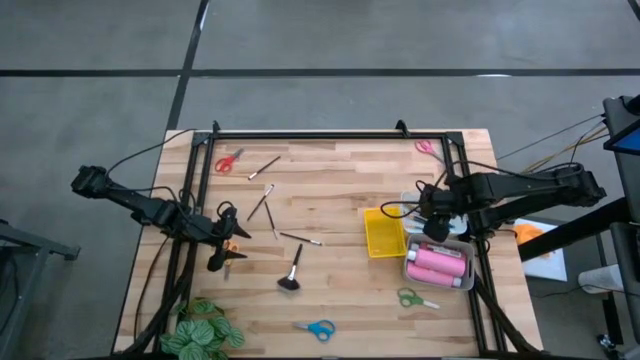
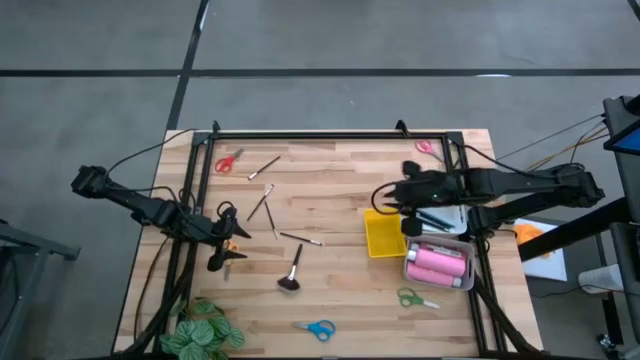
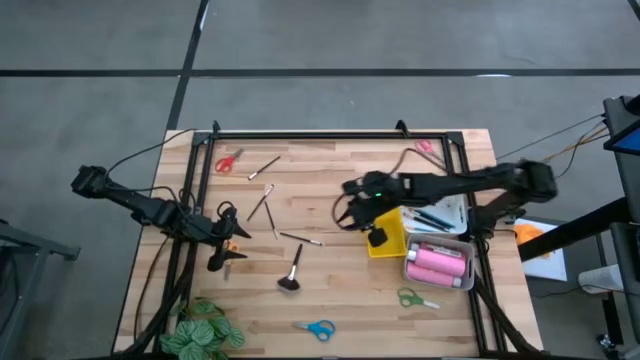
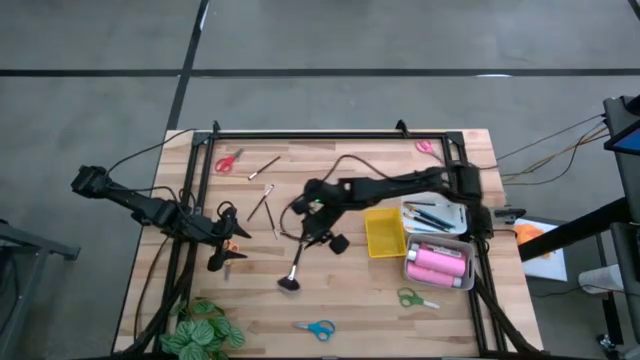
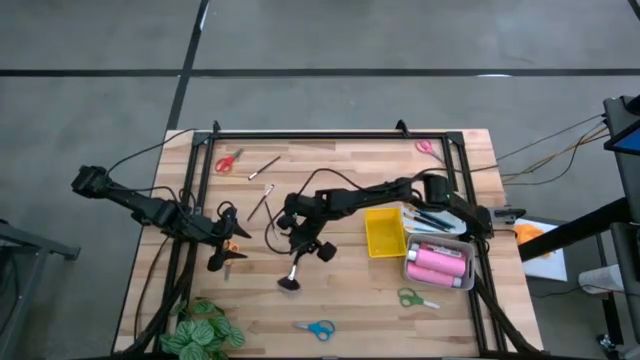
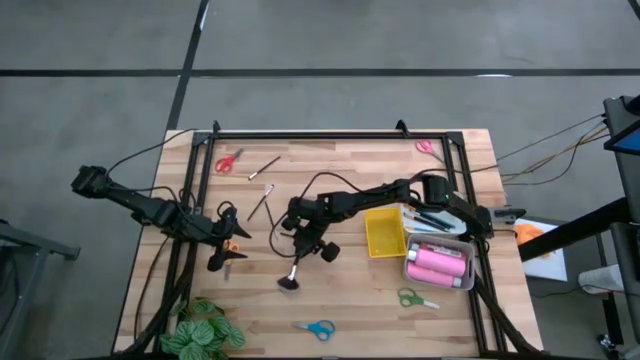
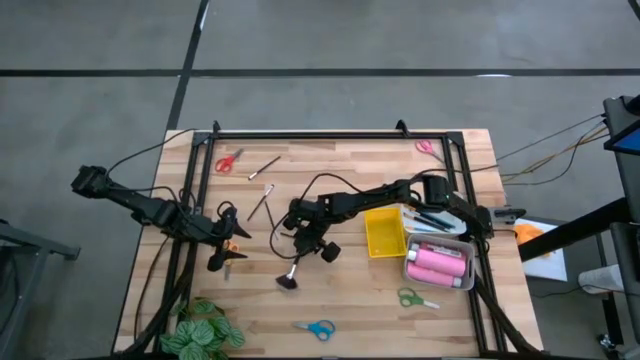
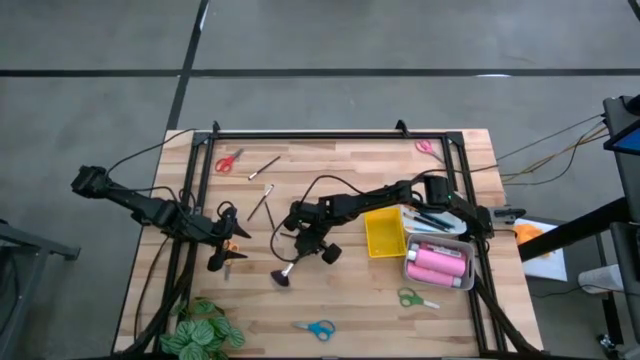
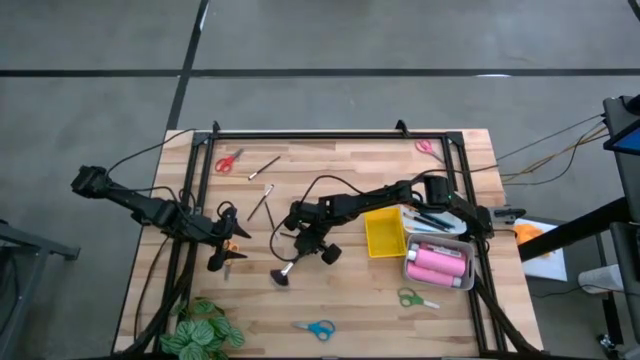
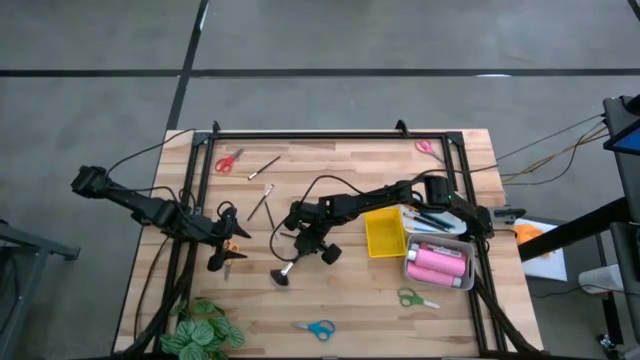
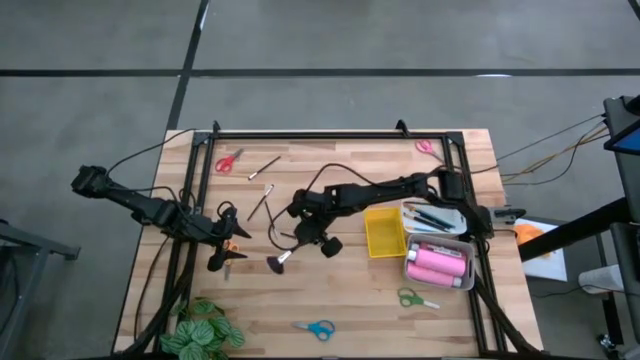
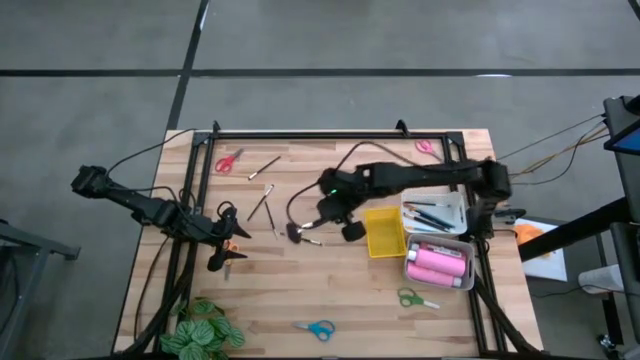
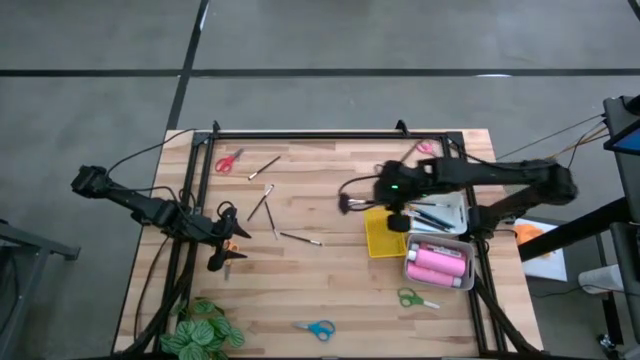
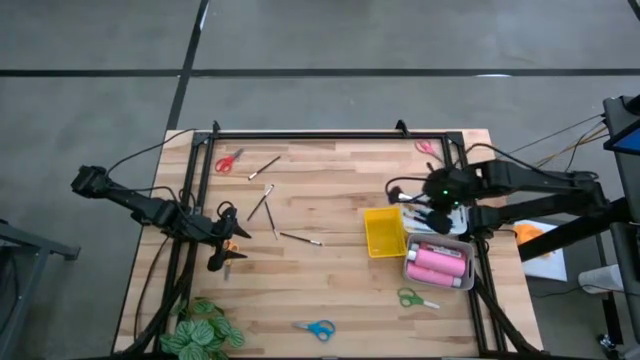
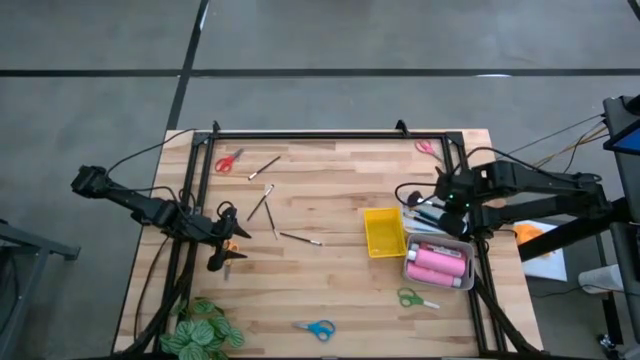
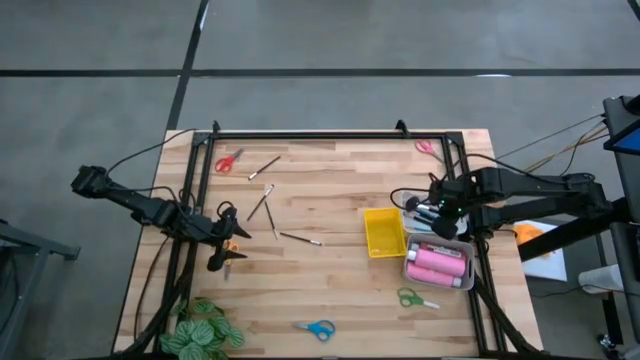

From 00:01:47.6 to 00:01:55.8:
Task: Pick & Place Paint Supplies
Put the black paint brush into the white bin

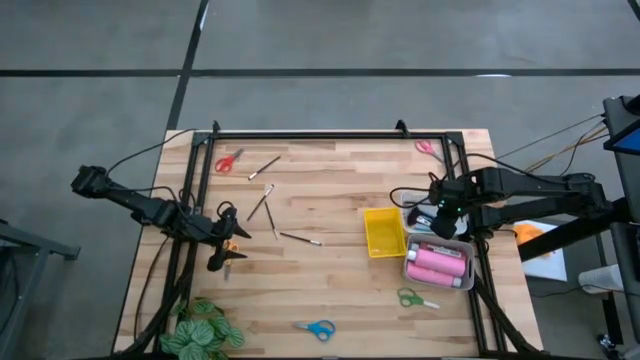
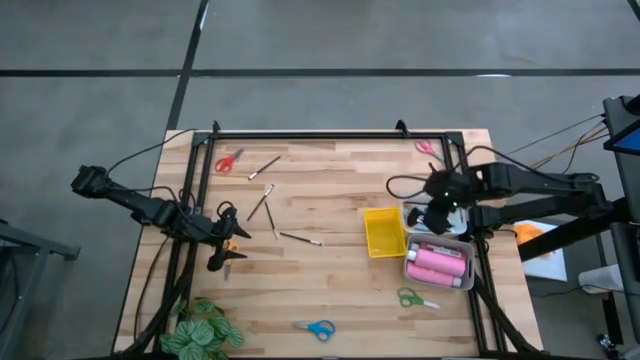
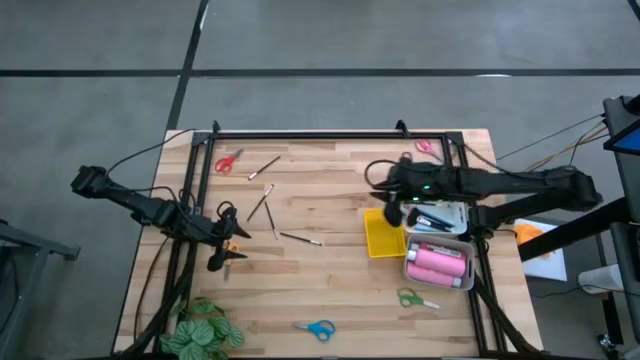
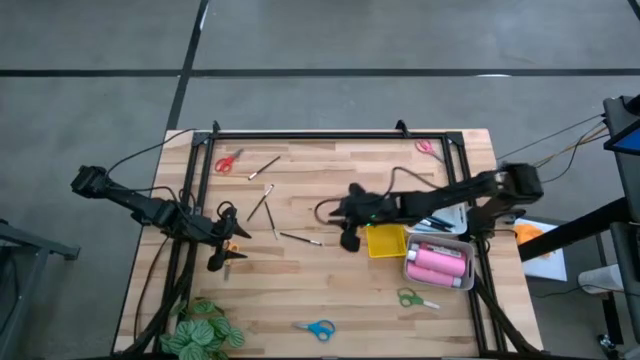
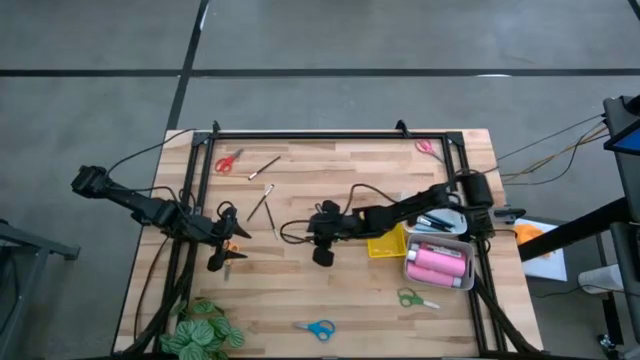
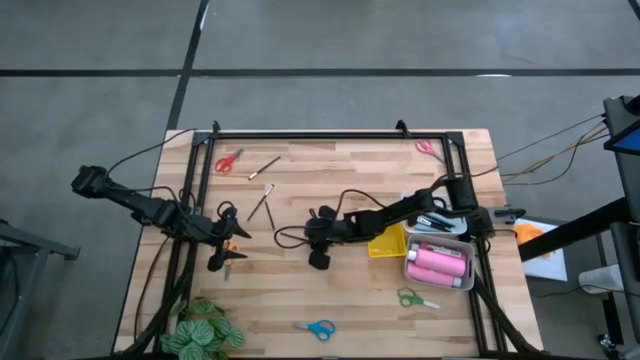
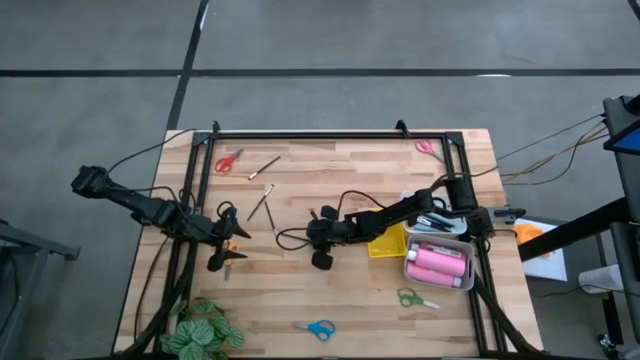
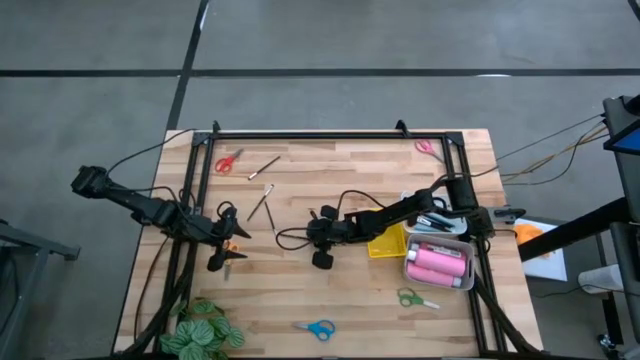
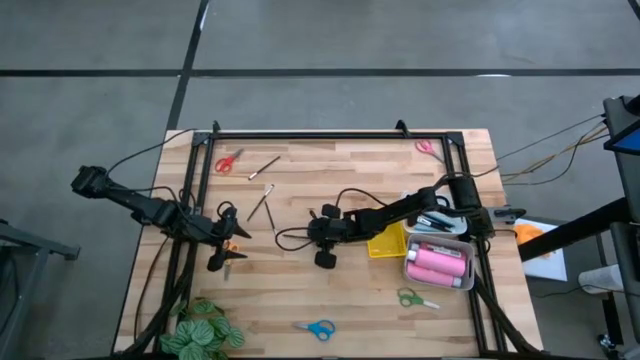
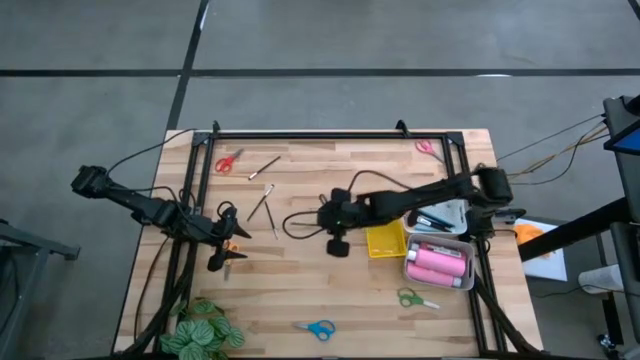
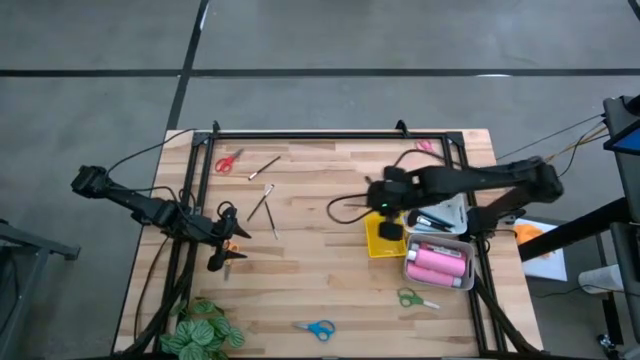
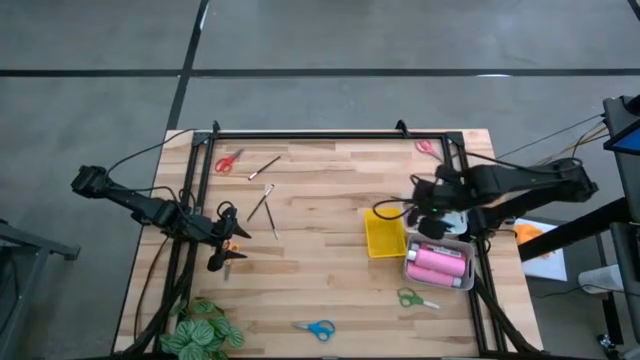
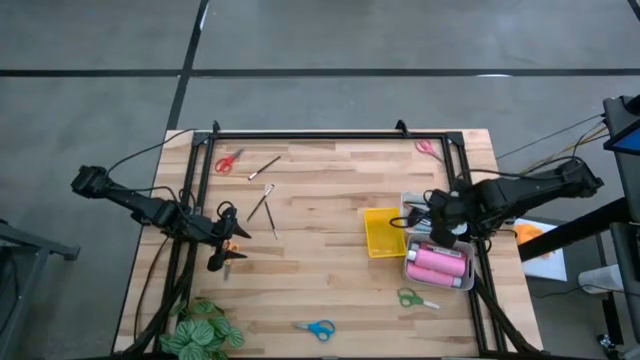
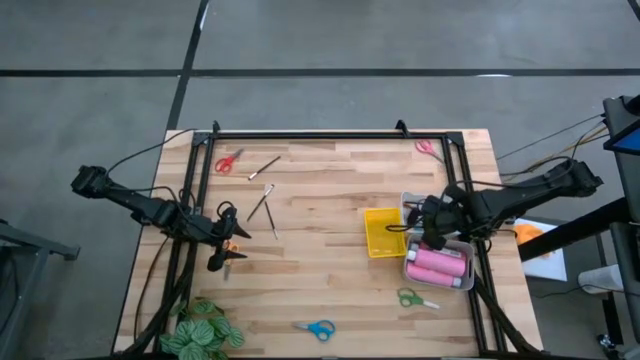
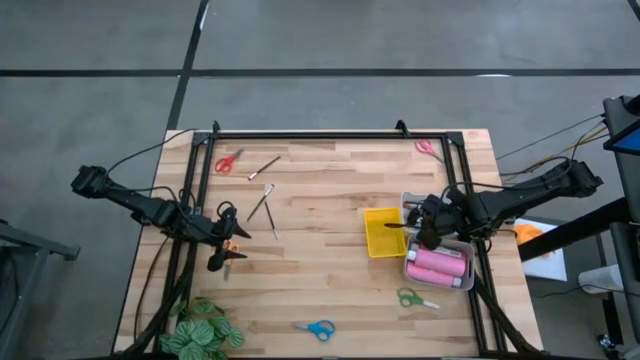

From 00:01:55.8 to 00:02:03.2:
Put the black paint brush into the white bin

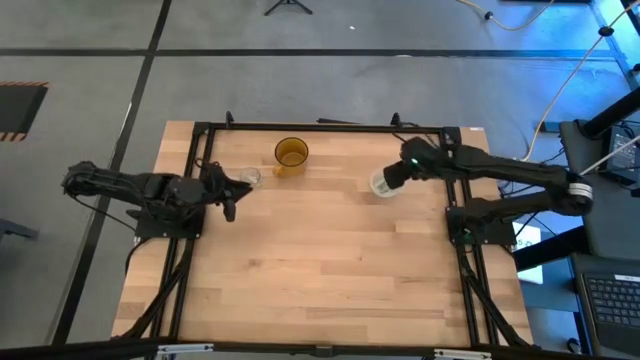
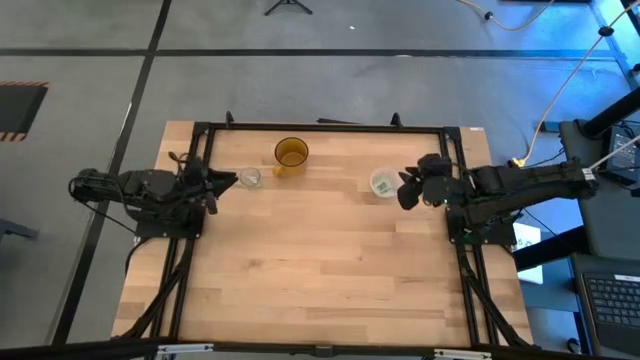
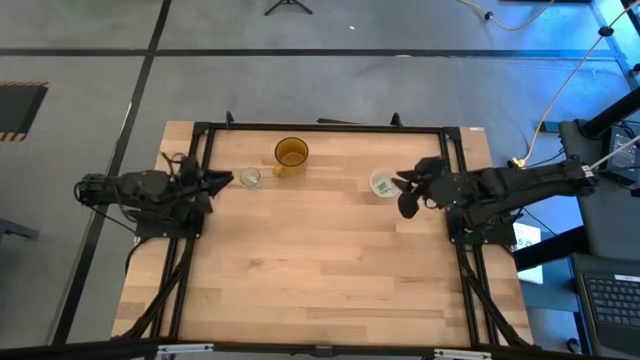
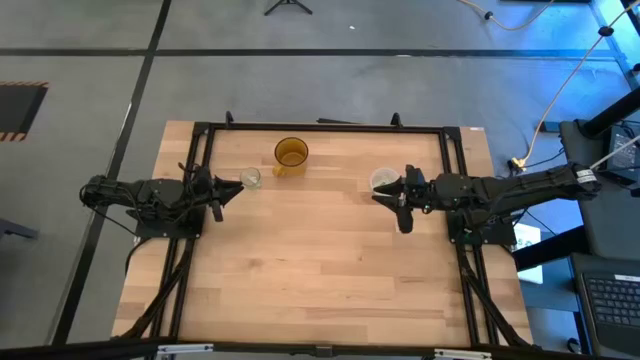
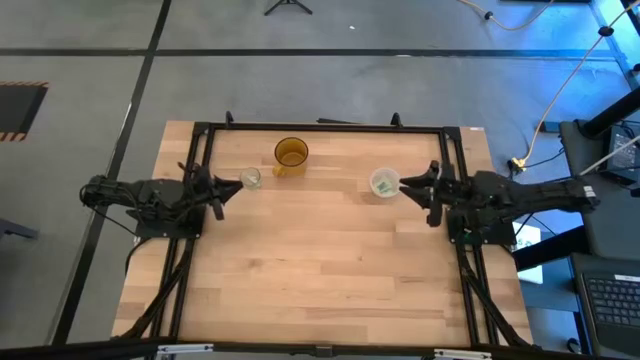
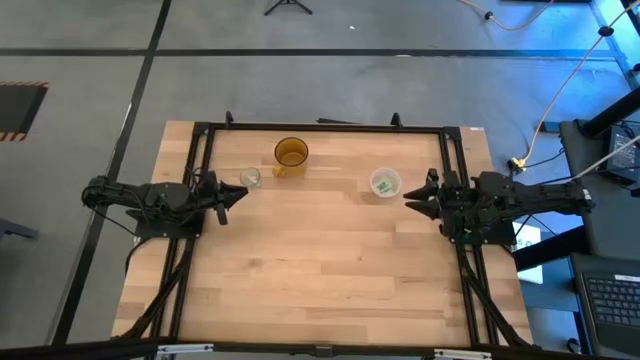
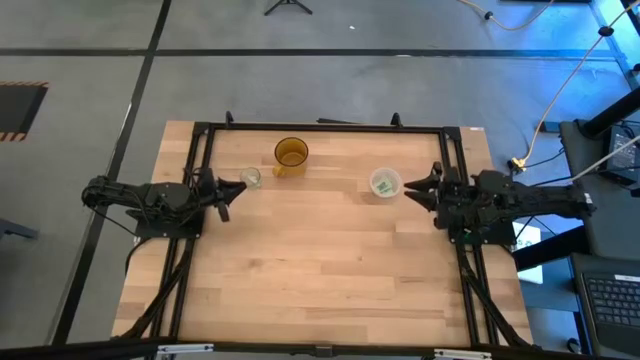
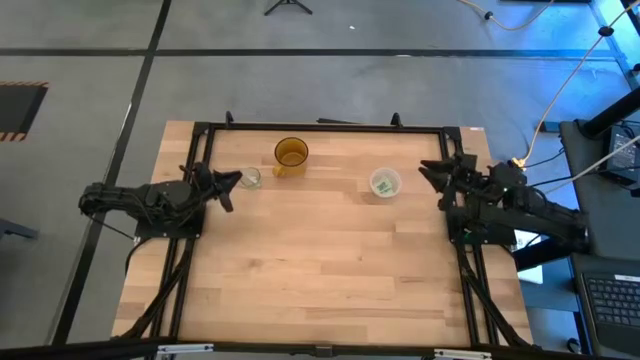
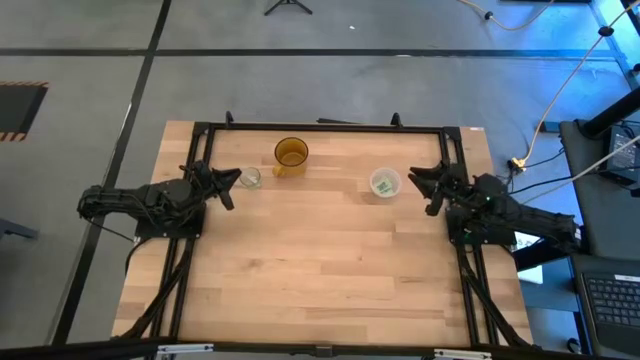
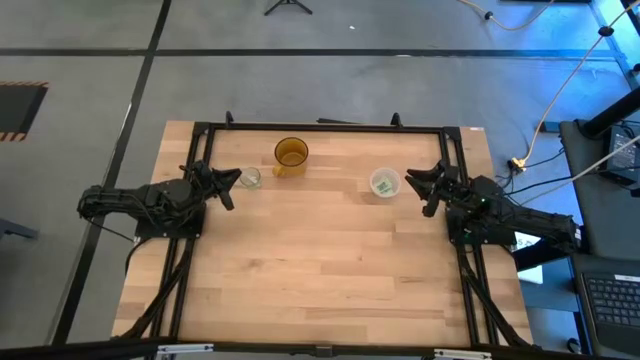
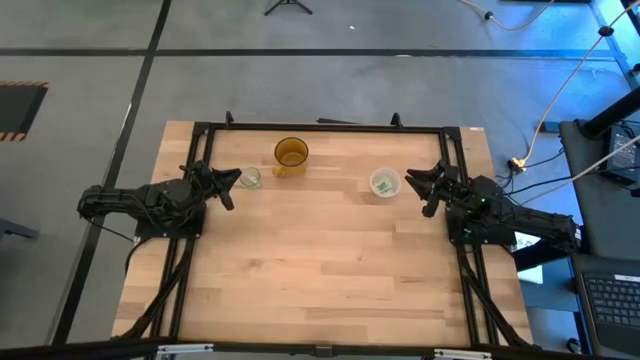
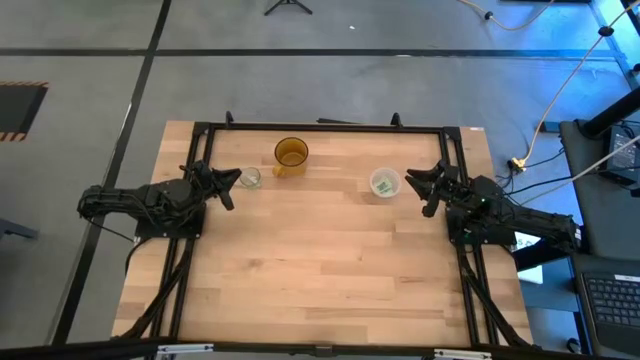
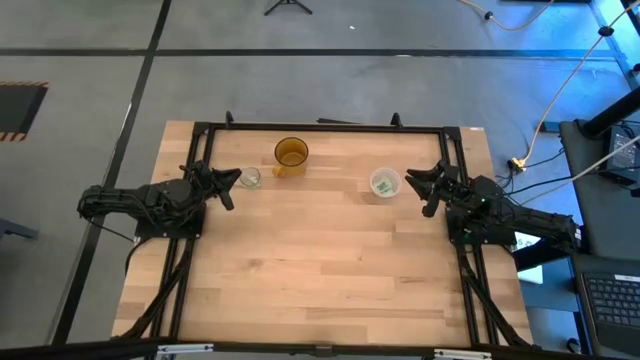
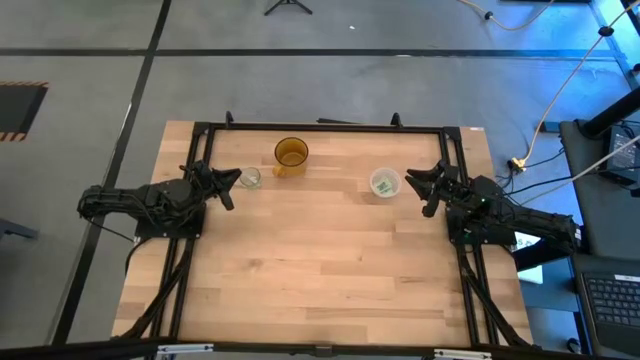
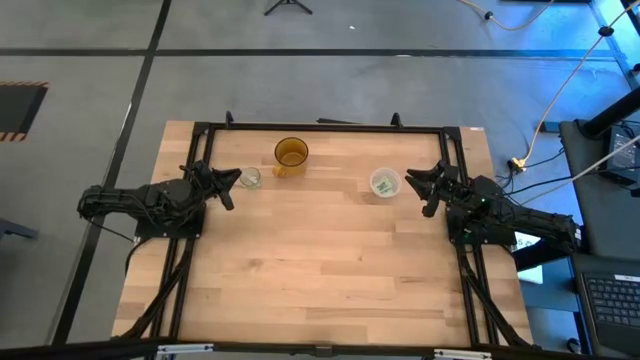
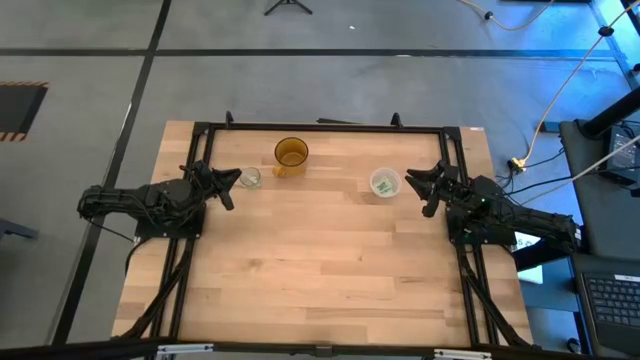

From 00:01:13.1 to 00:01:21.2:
Task: Pick and place Stevia / Truvia into bins
Return to Home Position
